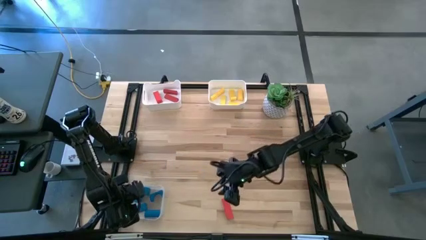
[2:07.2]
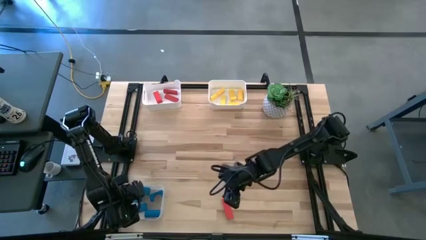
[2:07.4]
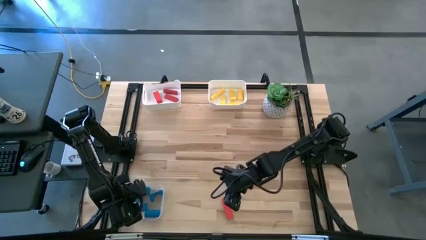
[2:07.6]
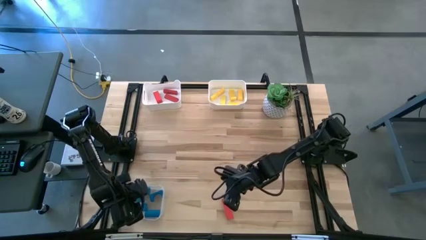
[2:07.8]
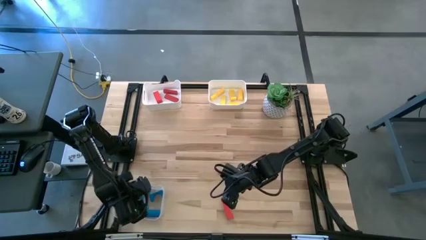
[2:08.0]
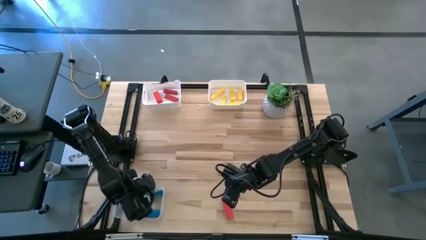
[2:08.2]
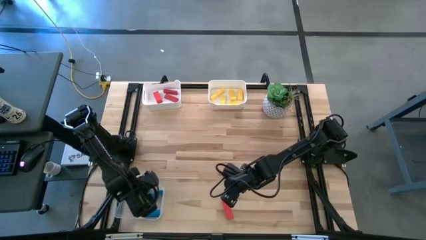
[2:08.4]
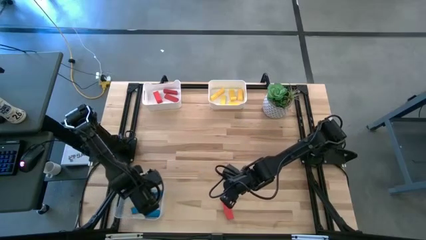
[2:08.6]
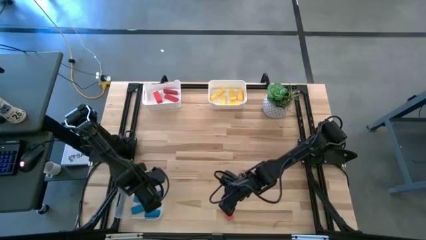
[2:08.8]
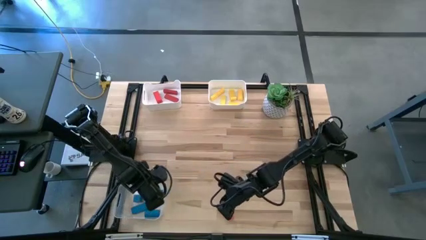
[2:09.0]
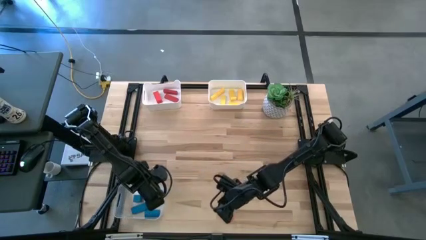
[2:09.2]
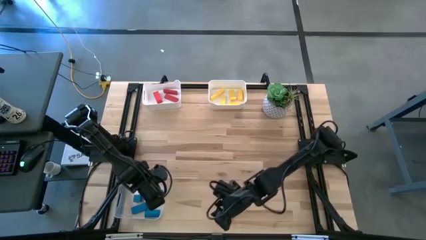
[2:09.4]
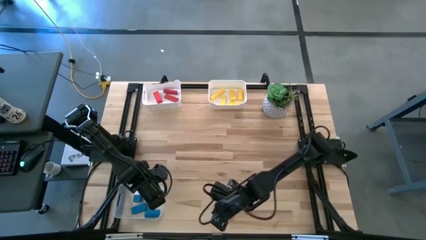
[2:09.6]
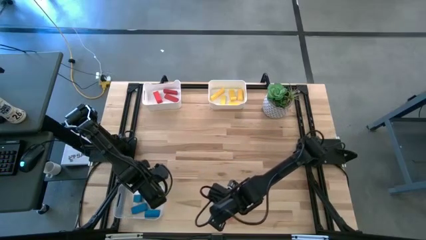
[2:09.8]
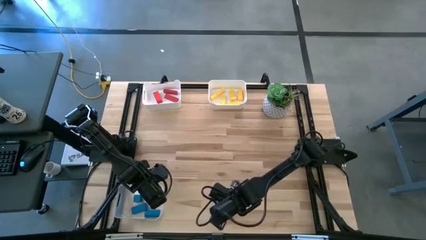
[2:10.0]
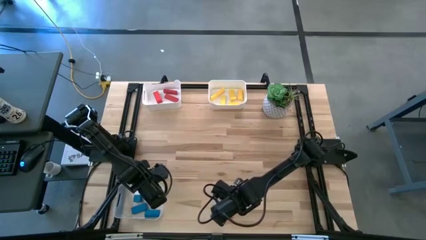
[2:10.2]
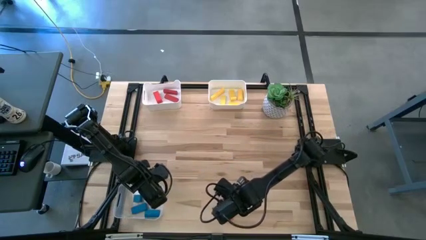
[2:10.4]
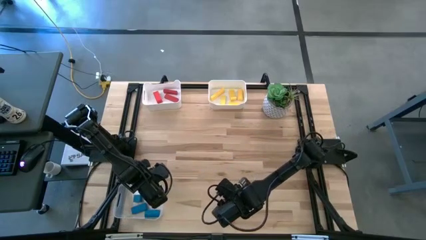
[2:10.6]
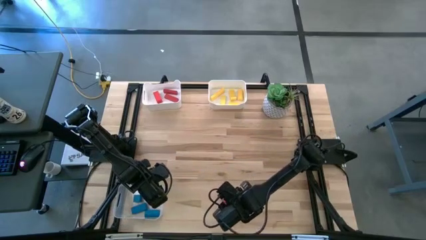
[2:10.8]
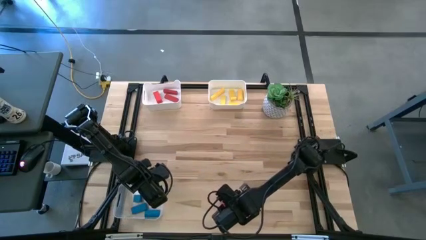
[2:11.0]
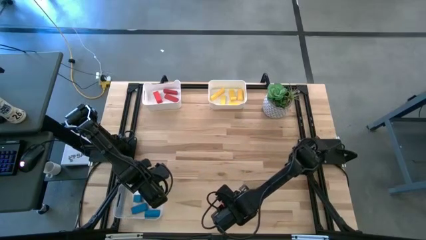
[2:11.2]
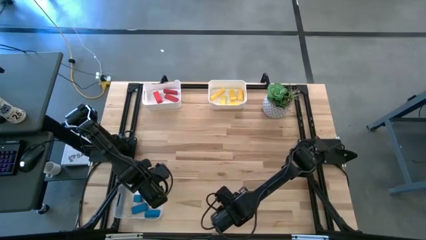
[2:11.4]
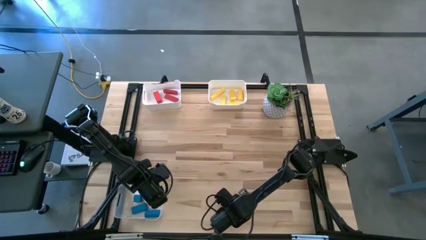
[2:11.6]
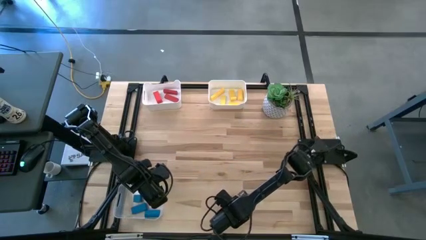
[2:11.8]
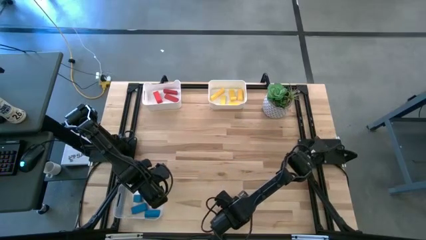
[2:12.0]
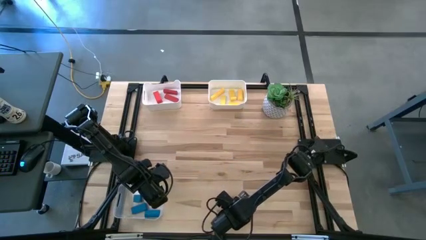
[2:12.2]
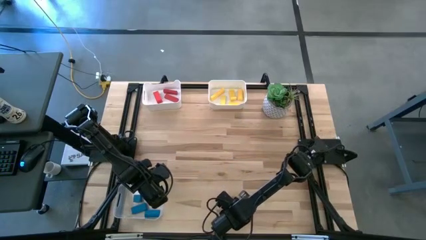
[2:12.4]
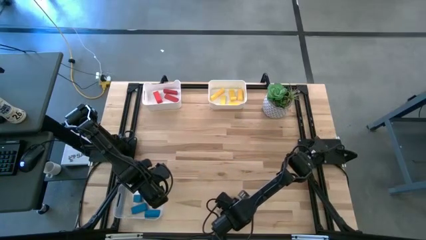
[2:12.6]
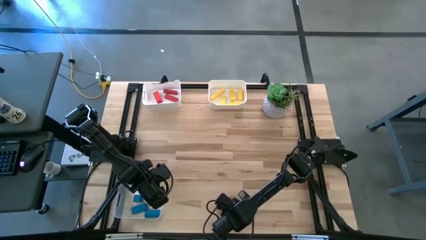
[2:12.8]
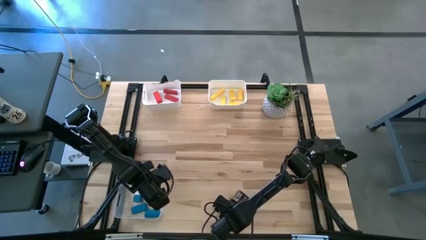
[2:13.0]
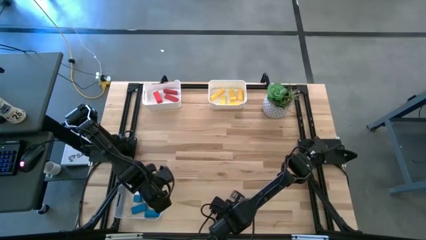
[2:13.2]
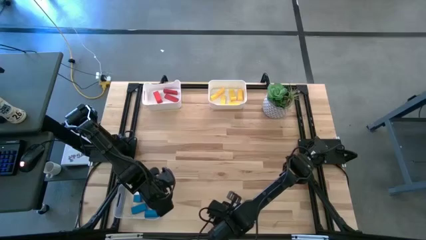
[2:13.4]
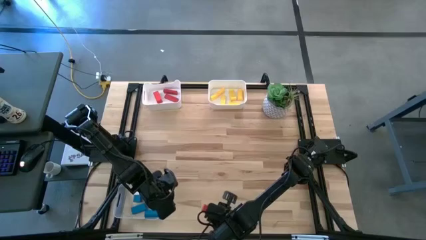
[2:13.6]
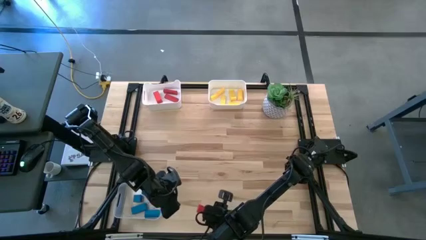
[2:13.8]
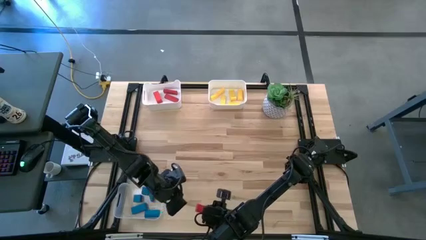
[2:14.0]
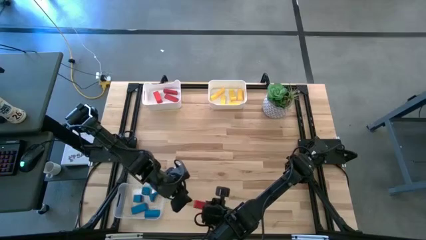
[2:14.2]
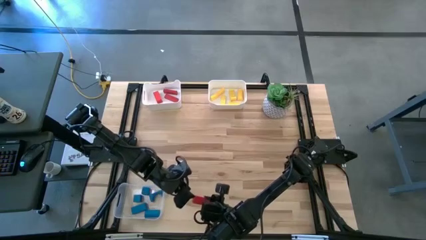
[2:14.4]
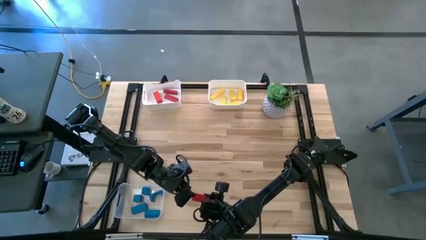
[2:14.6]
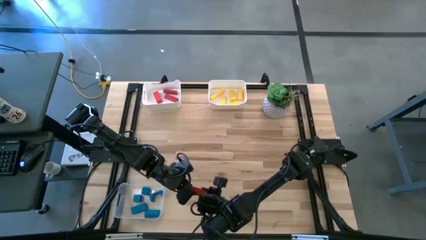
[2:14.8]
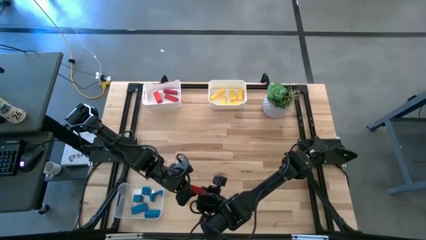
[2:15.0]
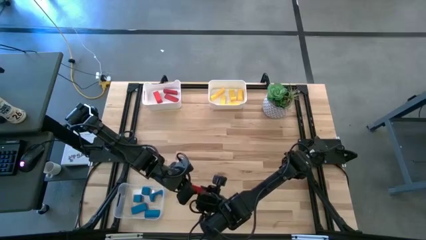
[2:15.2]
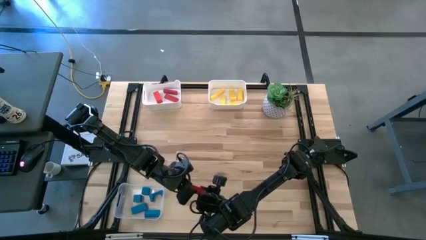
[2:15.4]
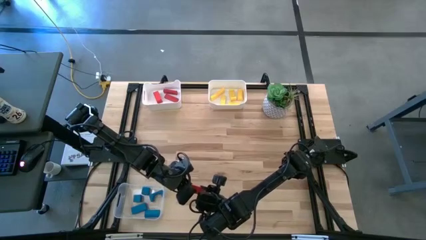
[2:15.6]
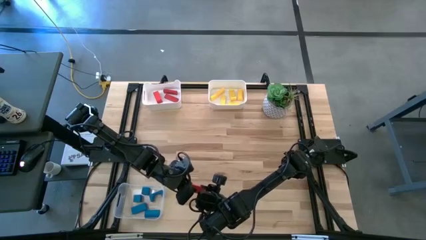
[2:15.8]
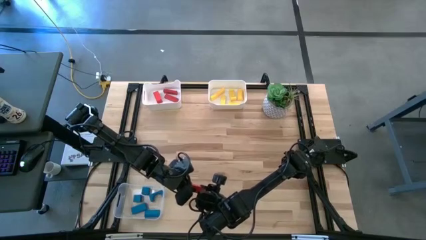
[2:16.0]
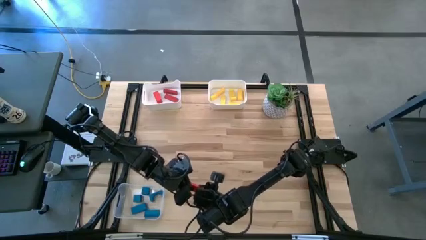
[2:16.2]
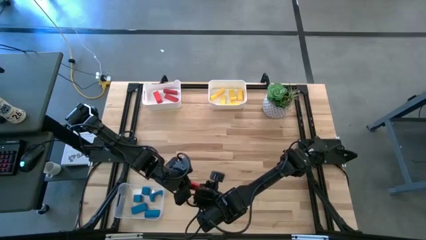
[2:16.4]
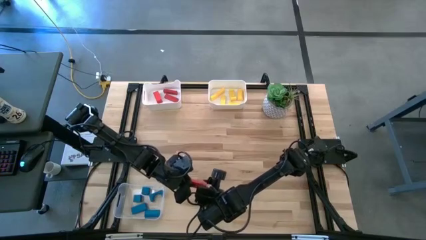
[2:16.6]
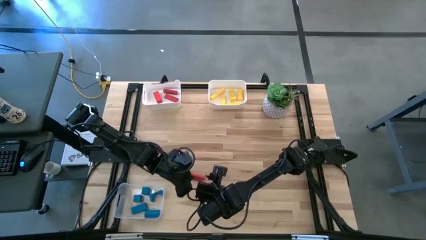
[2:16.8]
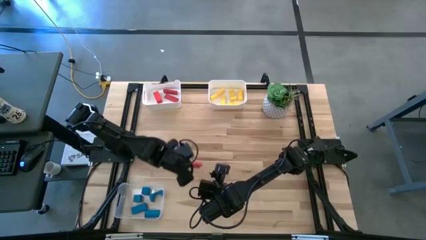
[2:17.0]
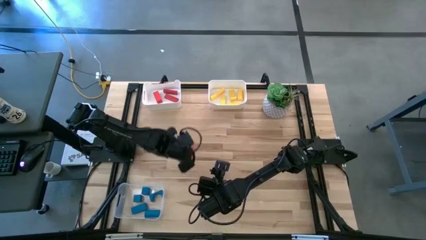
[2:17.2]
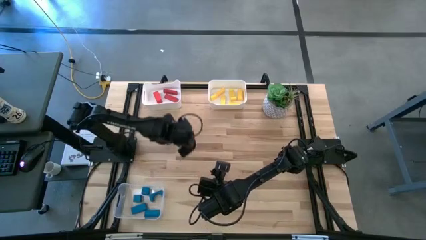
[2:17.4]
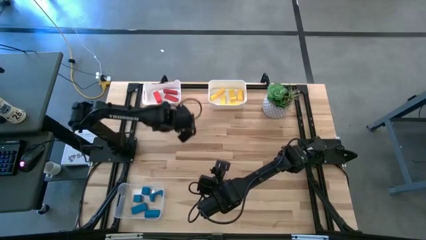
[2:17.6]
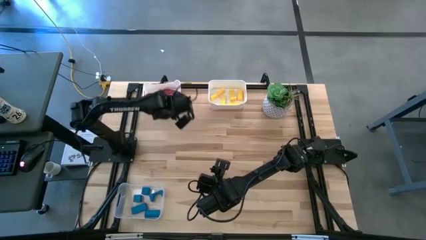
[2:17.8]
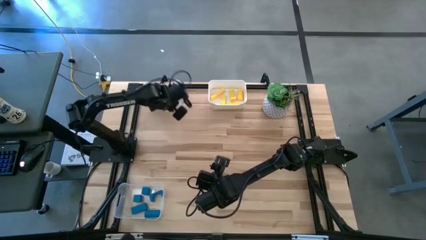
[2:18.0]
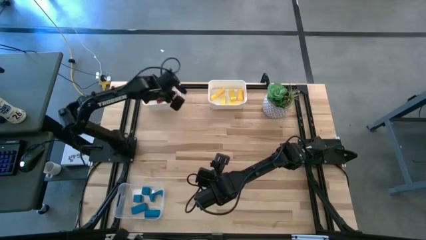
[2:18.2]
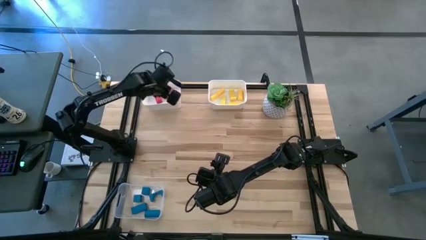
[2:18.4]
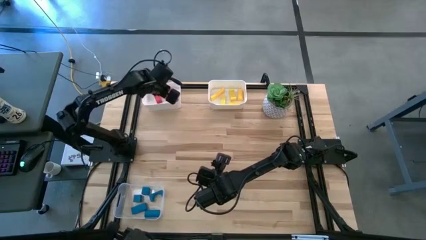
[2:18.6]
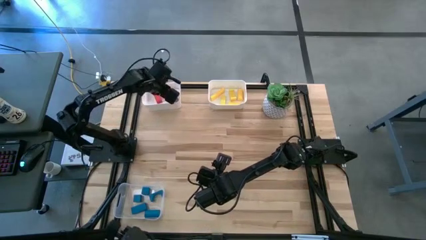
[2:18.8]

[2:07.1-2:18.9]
Task: Sort & place blocks by color
Put the red block into the left white bin

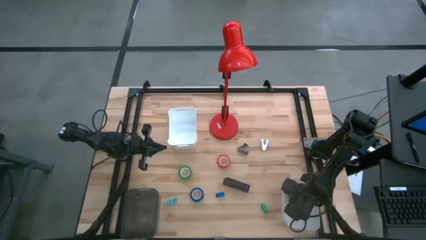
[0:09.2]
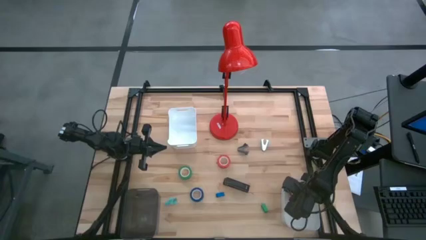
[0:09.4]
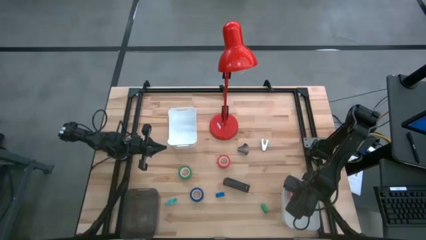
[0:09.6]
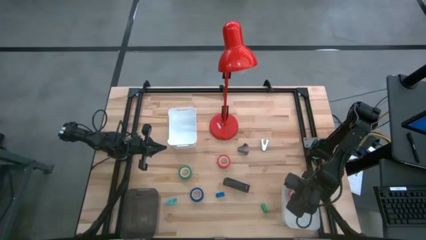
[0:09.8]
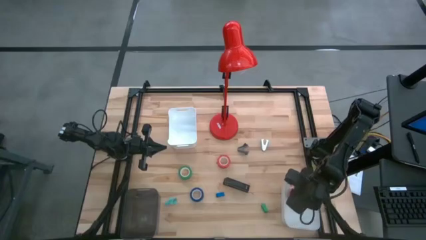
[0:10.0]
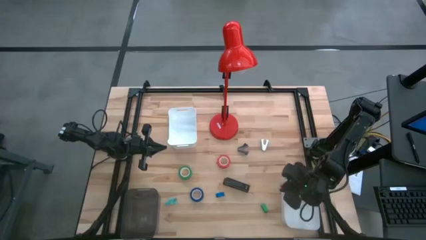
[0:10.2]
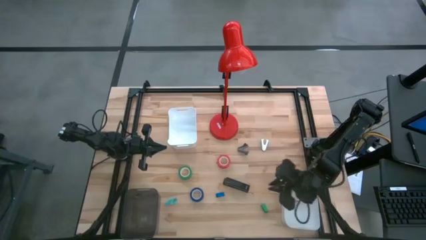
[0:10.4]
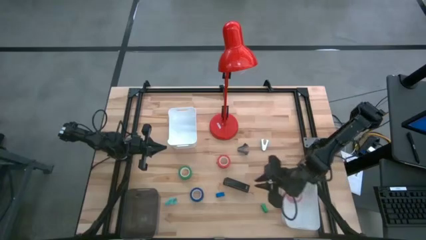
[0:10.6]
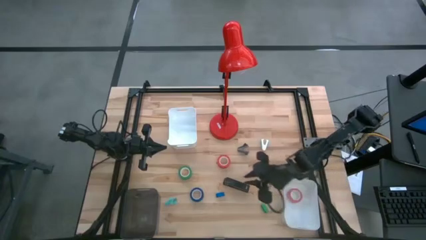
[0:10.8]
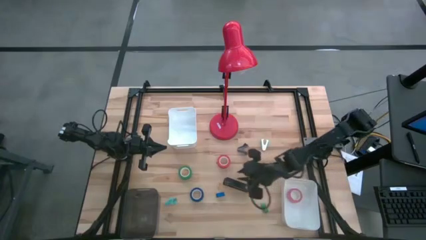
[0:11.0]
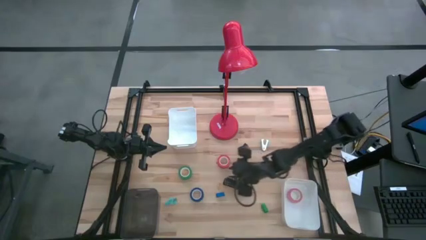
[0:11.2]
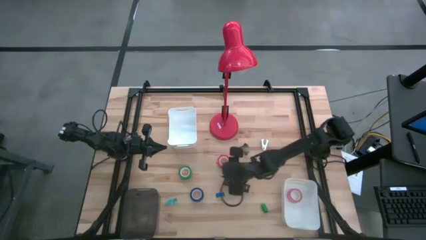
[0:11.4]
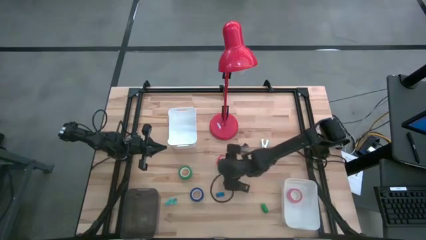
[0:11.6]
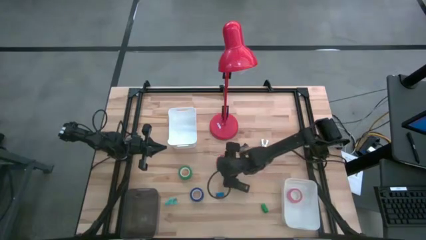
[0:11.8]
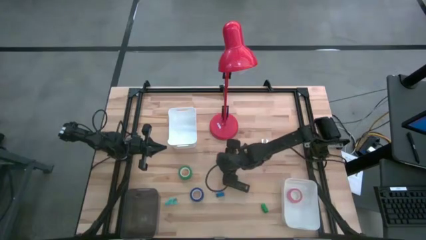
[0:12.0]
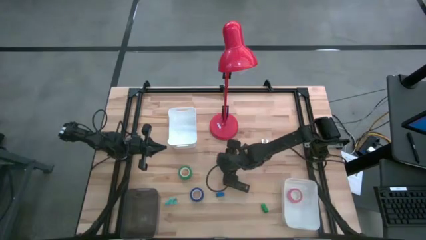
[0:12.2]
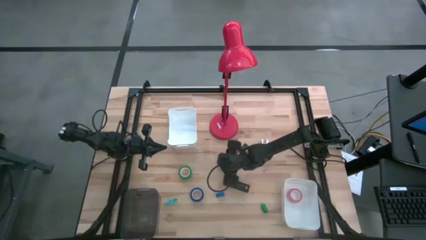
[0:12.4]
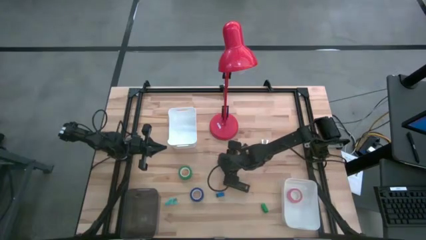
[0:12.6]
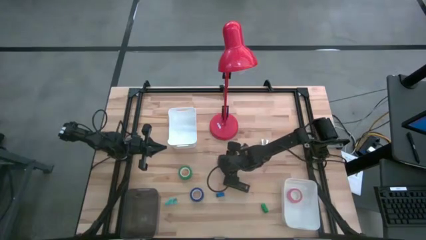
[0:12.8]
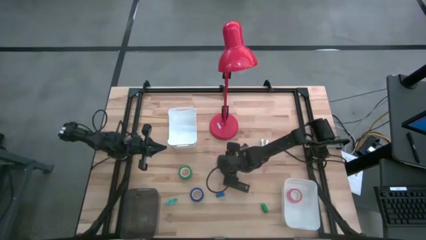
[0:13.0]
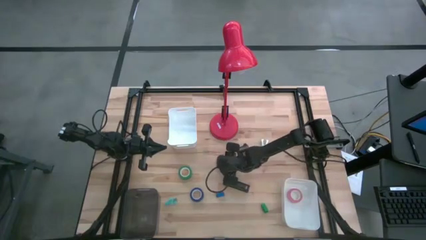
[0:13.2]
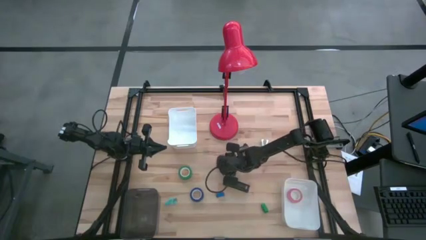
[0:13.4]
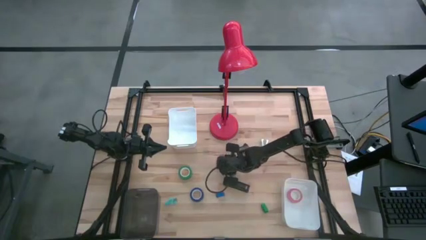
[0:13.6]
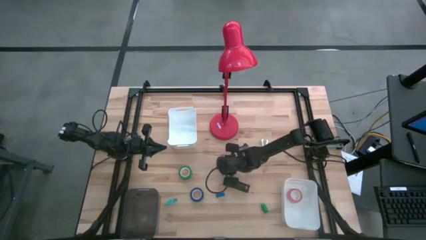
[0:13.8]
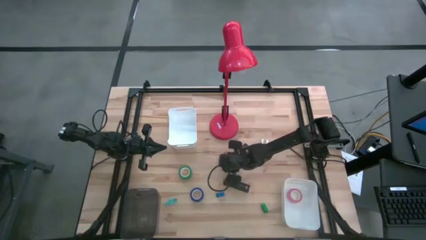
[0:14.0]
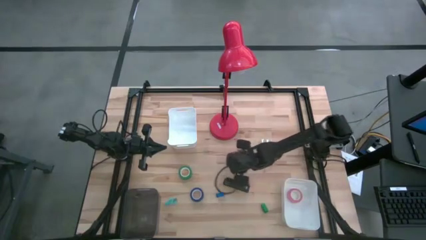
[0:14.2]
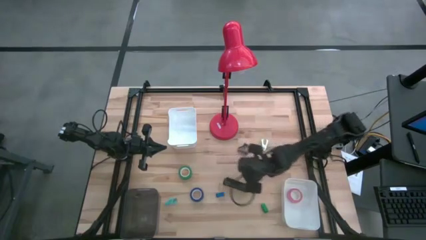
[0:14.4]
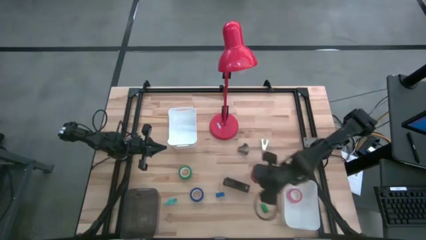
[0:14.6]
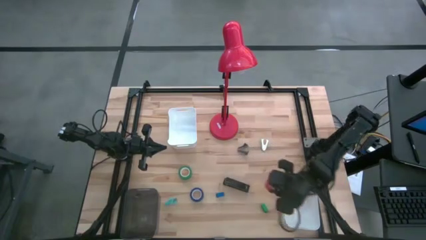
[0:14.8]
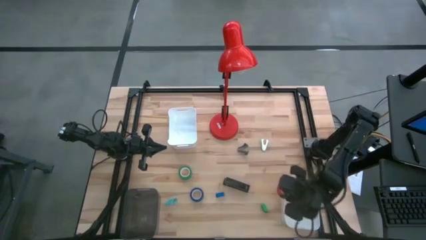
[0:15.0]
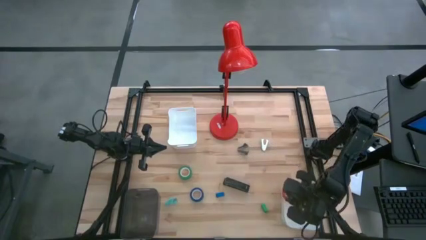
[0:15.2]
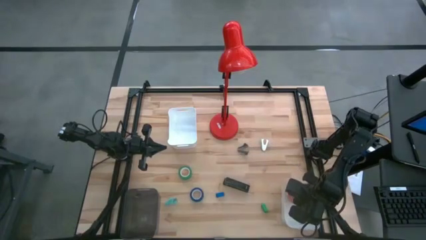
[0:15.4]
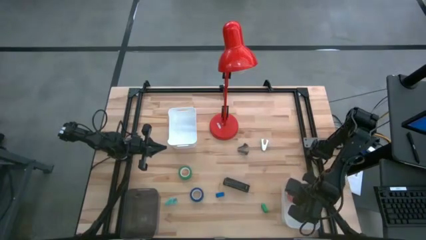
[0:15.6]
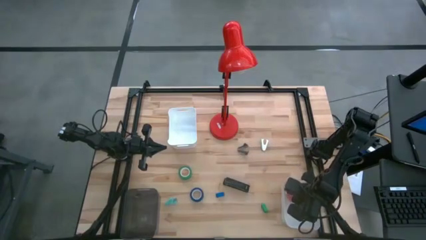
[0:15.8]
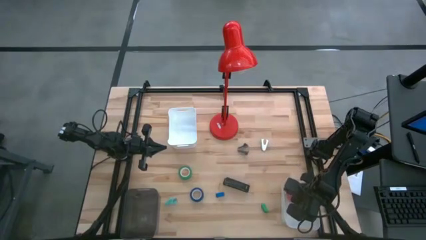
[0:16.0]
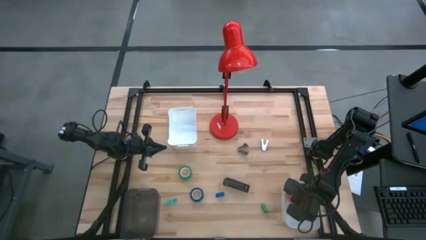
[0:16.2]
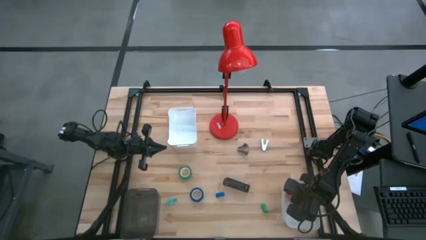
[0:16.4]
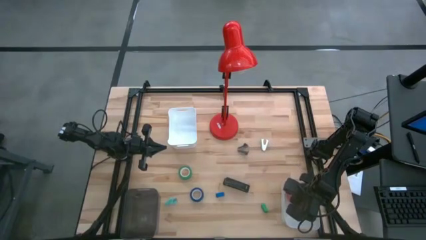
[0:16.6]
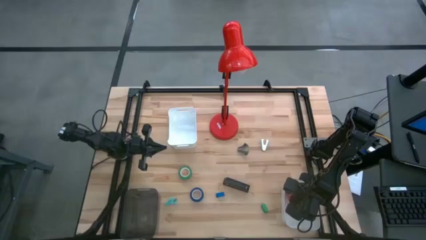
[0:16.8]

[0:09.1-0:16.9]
Task: Pick and place Stapler, Stapler remover, tape
Put the red tape into the bottom white bin
